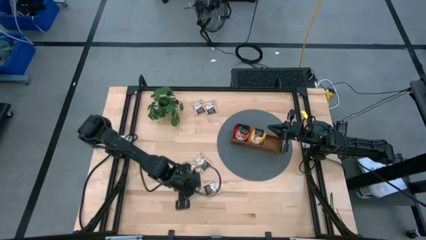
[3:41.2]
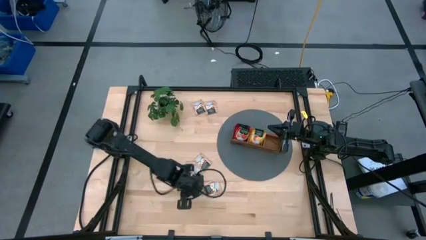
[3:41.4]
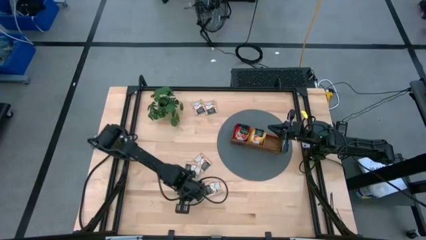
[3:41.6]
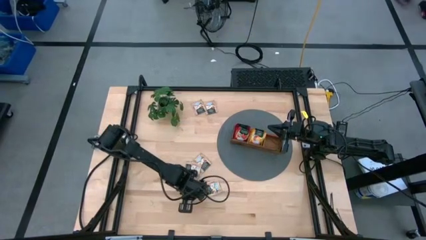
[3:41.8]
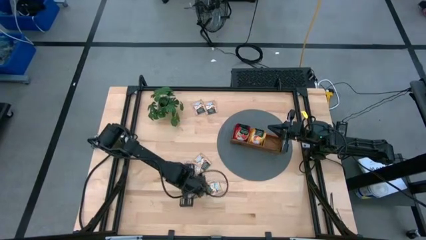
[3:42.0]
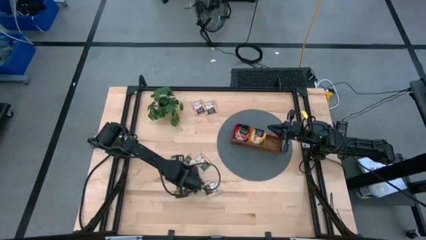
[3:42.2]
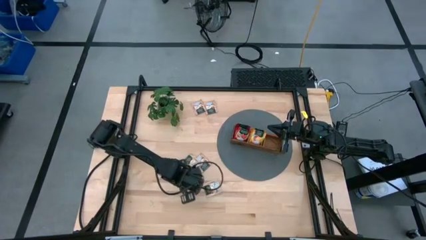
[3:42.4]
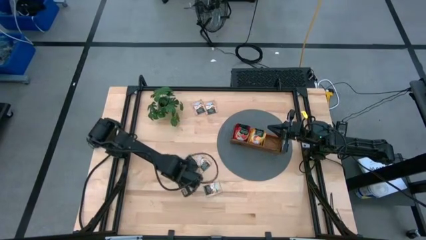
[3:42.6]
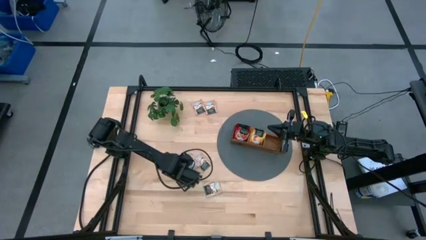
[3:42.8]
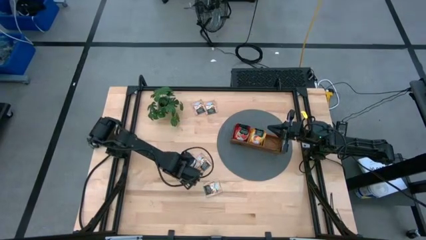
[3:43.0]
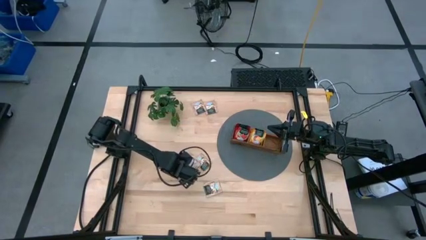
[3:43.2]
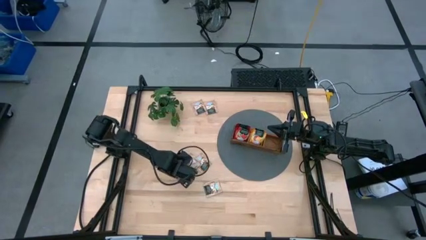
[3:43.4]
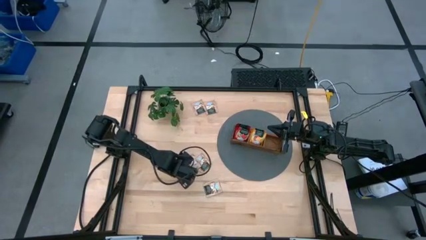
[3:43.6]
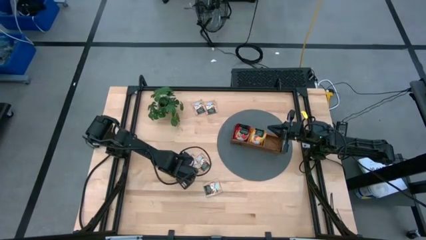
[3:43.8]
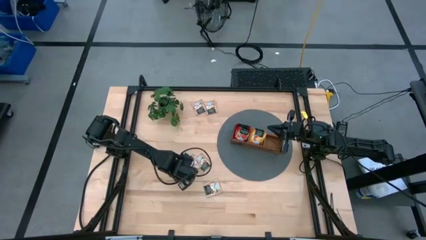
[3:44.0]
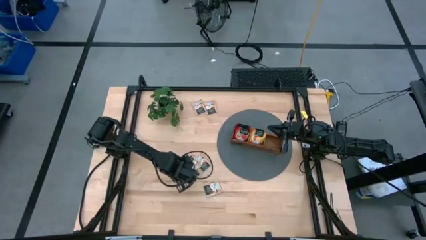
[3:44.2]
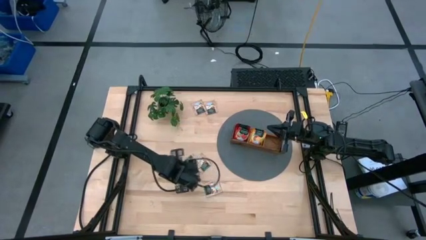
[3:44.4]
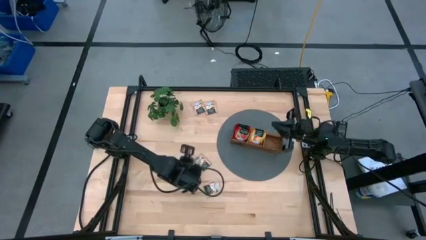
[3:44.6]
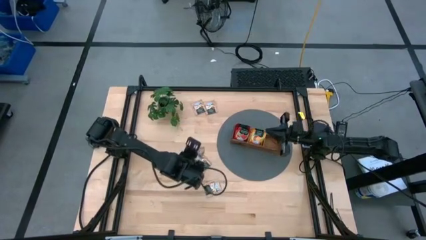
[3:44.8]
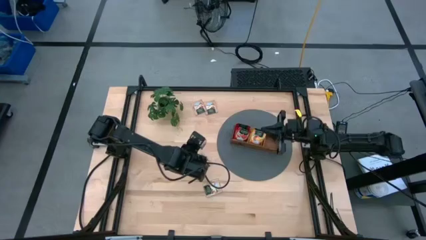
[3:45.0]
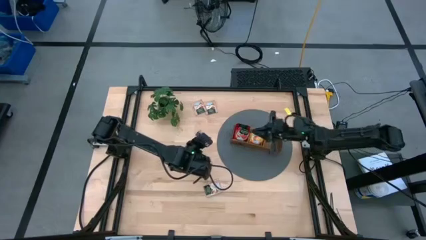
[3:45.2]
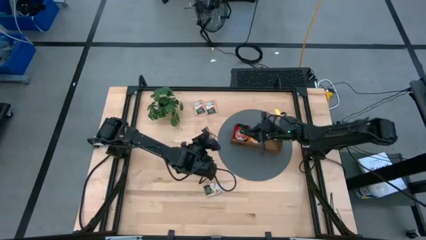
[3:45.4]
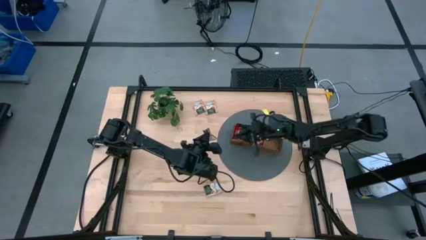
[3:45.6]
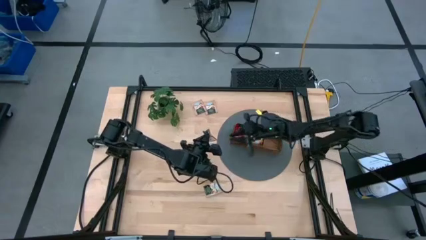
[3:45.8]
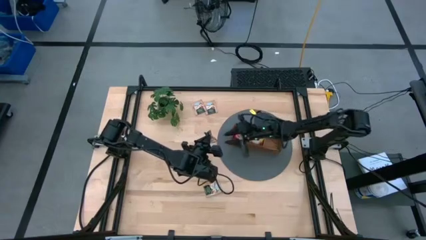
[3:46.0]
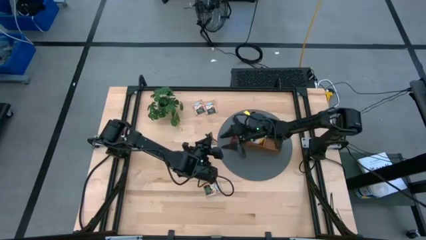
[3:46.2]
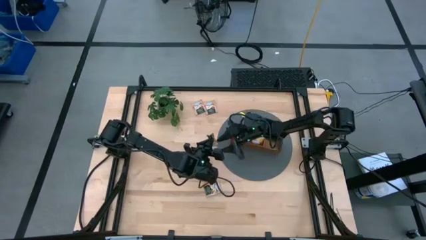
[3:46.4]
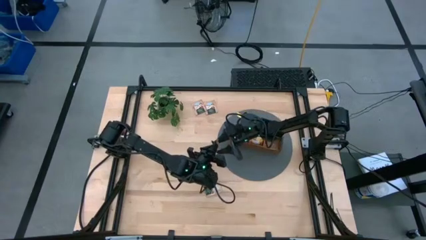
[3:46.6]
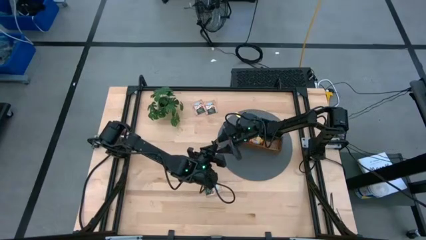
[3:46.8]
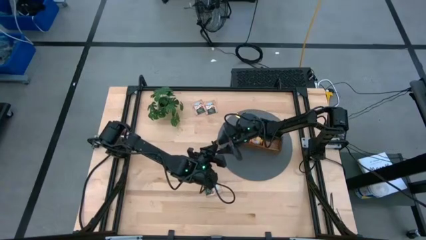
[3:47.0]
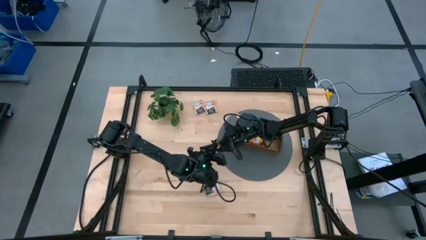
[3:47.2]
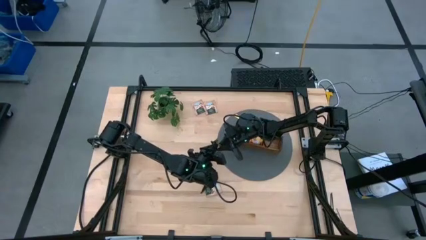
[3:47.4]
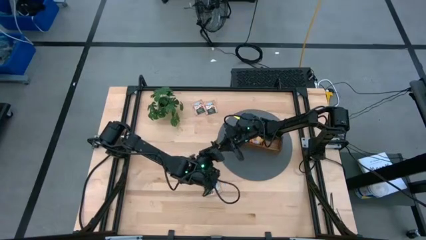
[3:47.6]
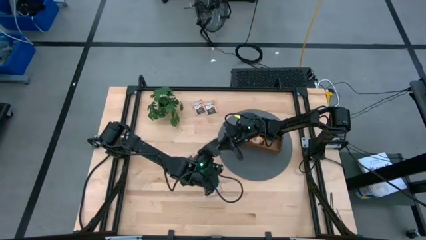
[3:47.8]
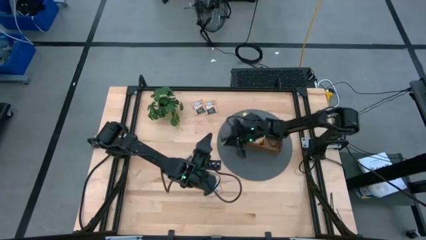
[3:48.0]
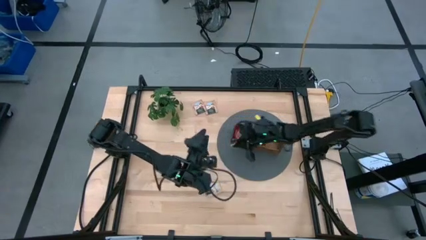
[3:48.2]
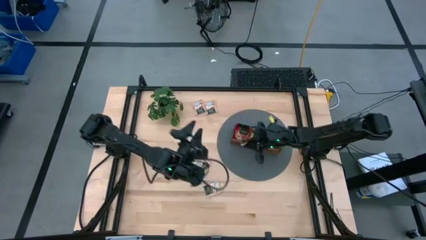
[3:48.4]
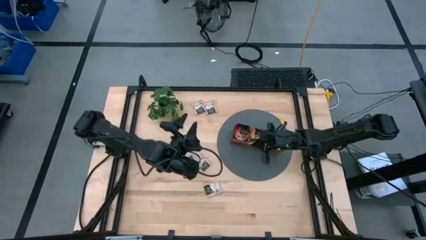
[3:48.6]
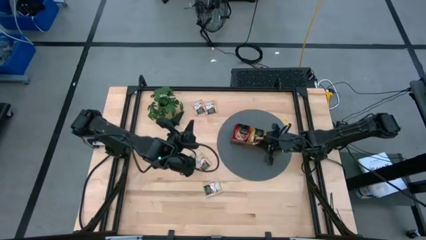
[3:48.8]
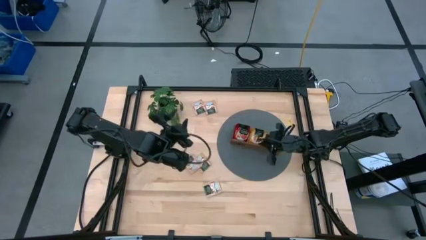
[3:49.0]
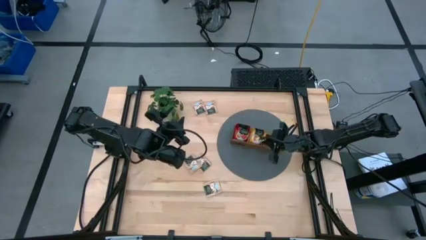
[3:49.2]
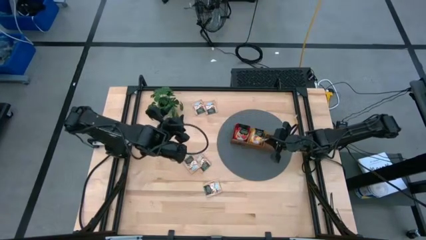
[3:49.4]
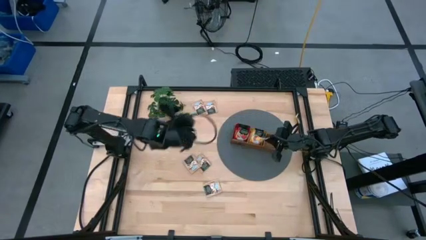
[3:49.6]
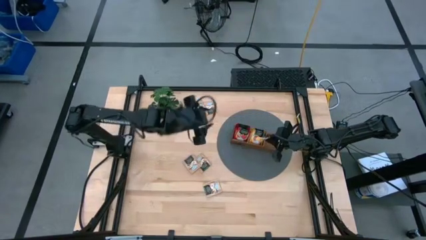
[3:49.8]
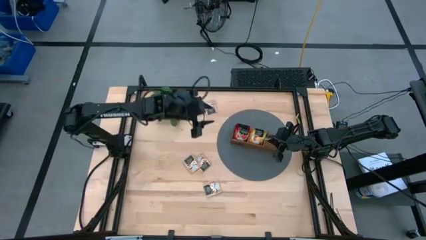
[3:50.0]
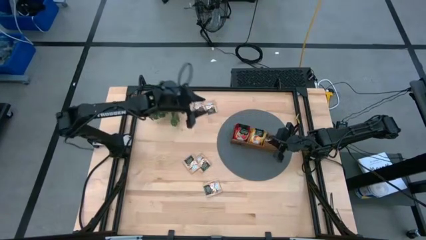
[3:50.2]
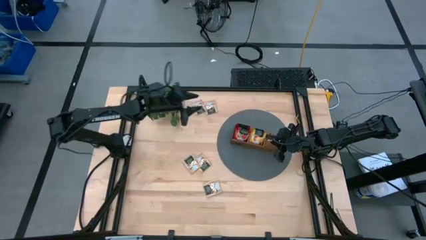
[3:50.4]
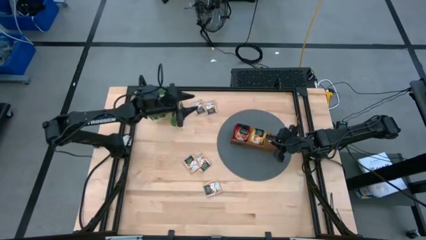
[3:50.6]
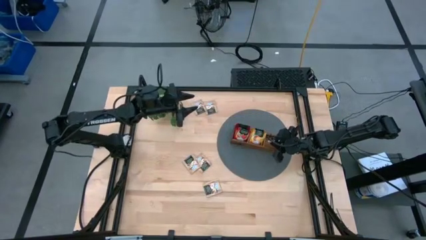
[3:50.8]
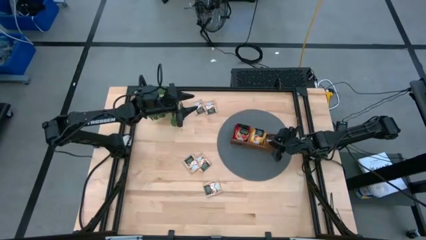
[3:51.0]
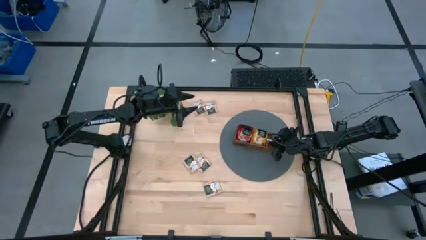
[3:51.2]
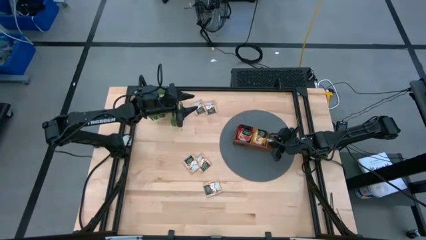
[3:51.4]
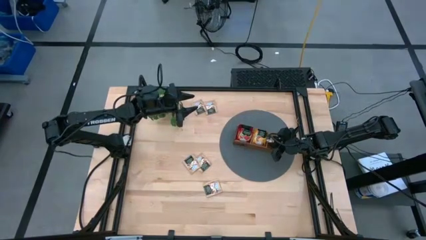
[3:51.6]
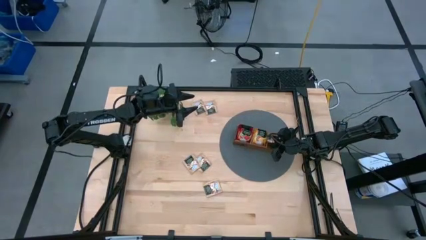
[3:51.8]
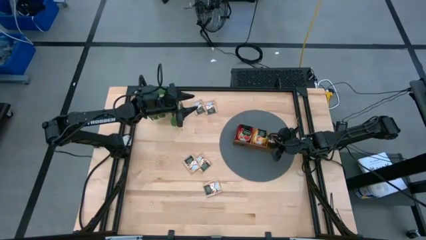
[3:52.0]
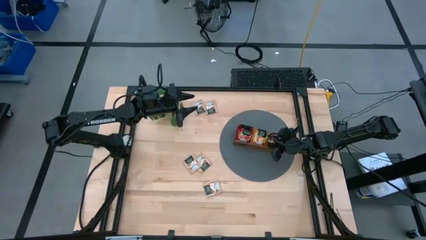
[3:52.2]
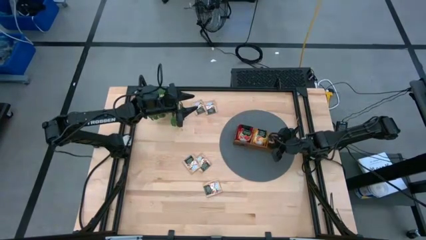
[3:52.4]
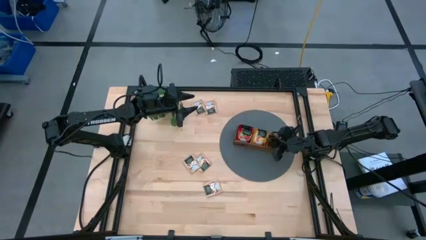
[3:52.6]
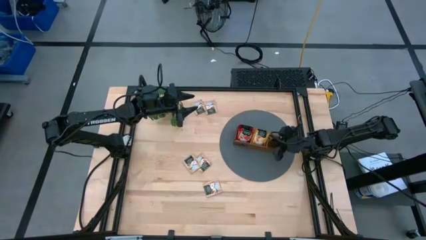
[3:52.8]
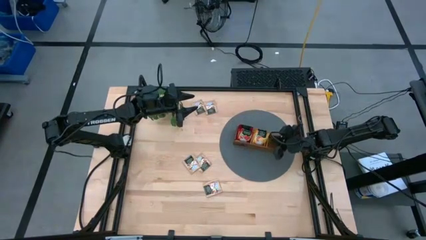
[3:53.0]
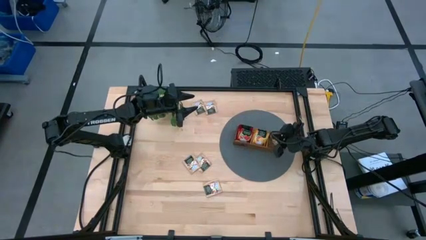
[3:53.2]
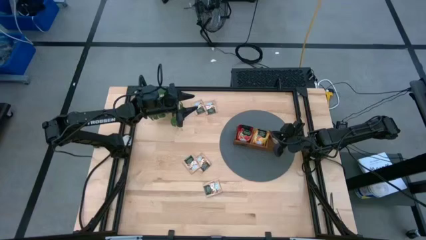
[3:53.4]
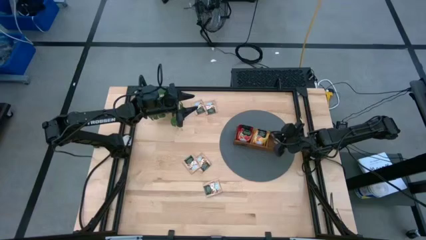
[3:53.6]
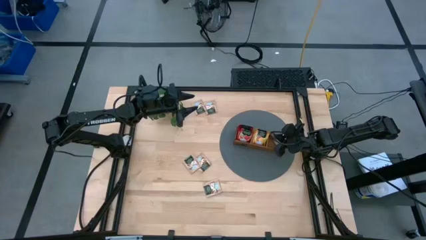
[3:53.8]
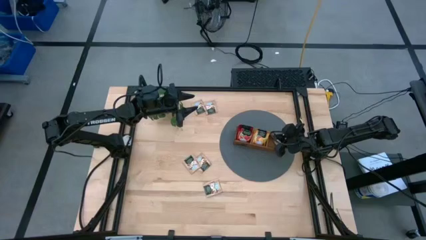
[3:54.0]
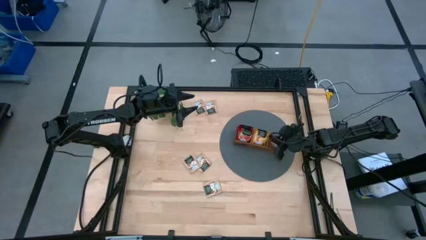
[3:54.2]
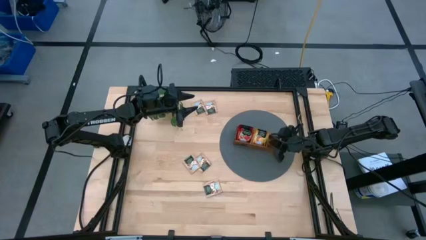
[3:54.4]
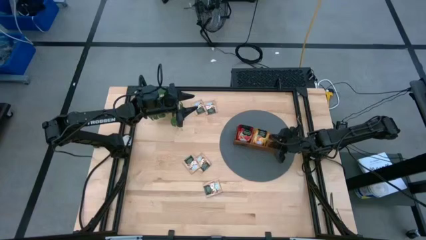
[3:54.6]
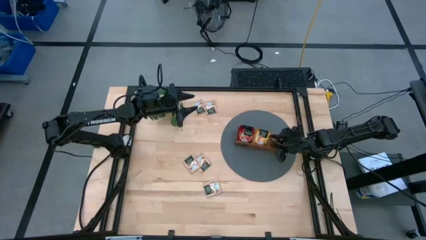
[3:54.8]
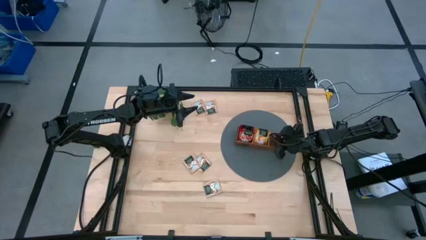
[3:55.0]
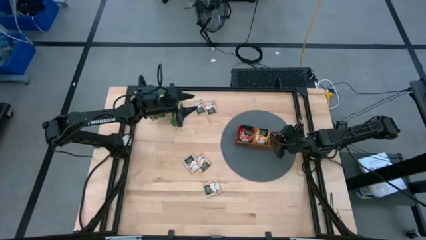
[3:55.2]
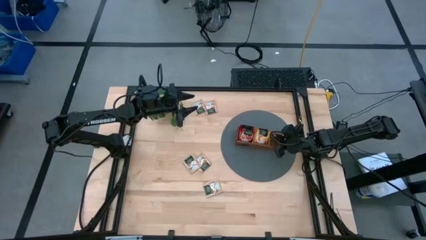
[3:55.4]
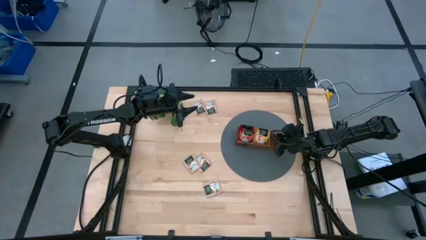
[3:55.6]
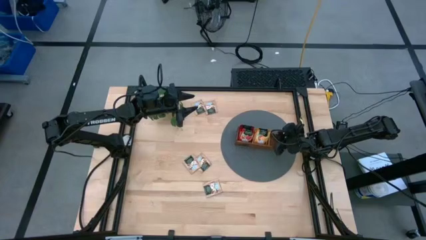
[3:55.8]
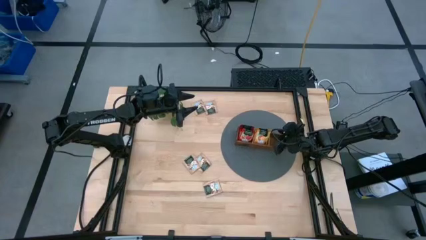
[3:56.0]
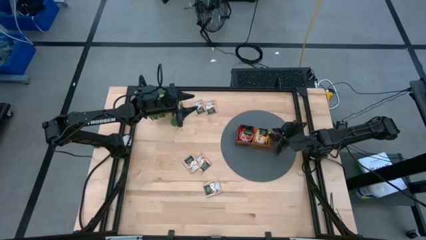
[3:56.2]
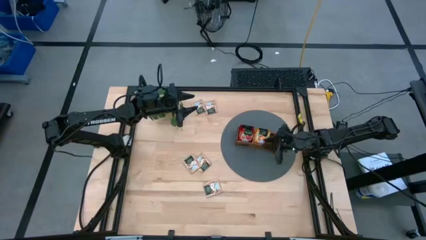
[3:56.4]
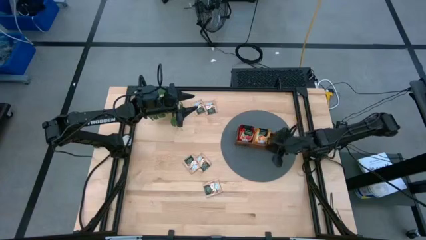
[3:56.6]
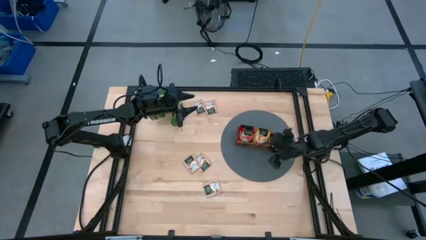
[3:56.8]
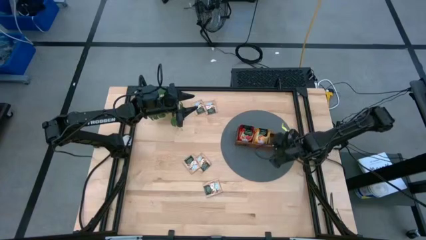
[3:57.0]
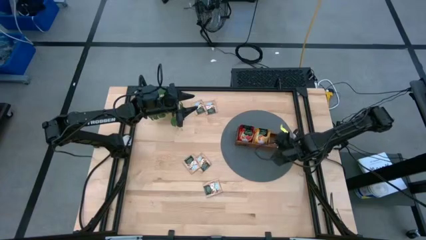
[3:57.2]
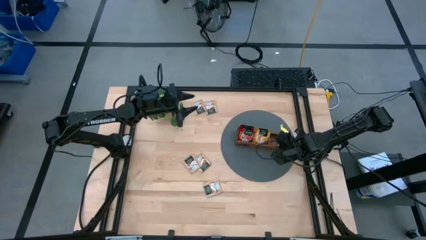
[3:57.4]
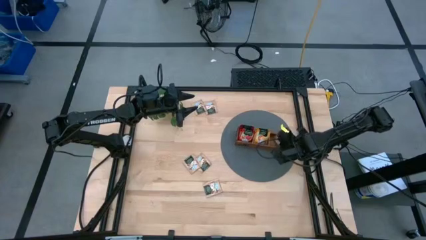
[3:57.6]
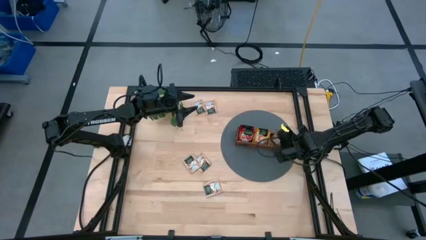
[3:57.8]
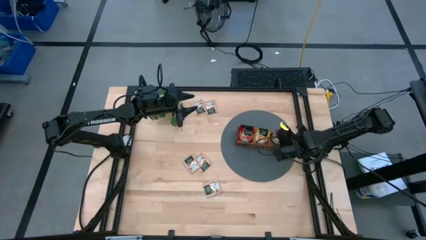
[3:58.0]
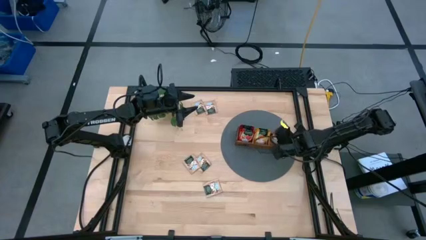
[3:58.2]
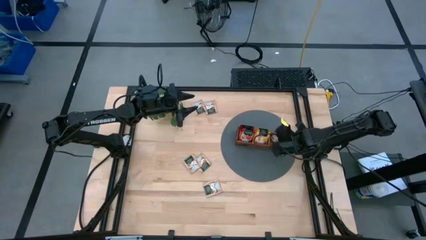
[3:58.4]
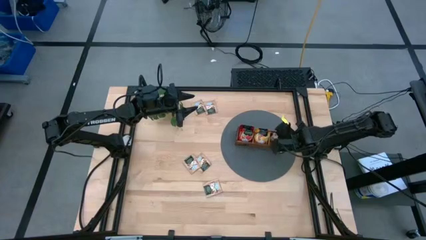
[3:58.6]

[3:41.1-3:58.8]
Task: Pick & Place Tea
Put the brown tea bag into the right section of the wooden organizer
